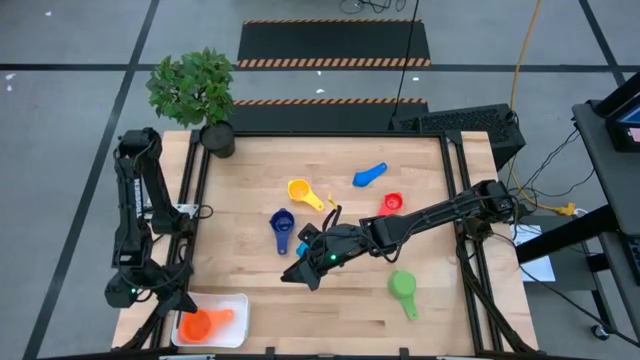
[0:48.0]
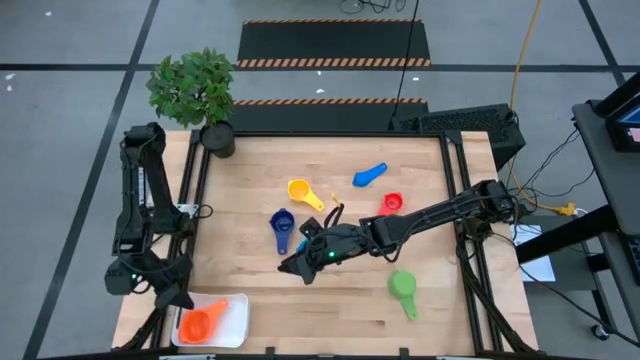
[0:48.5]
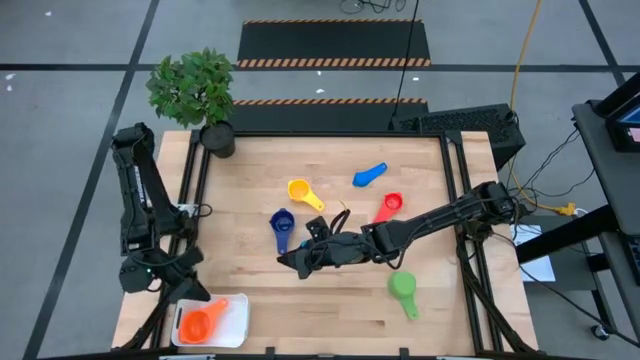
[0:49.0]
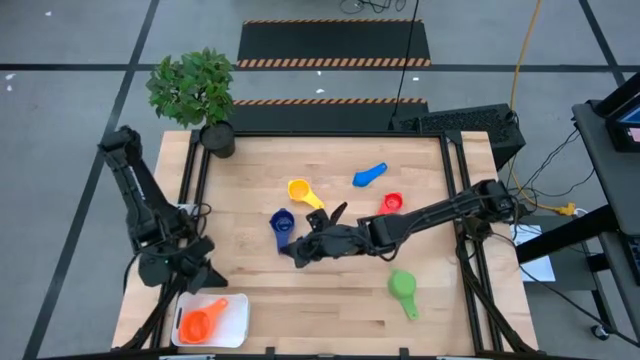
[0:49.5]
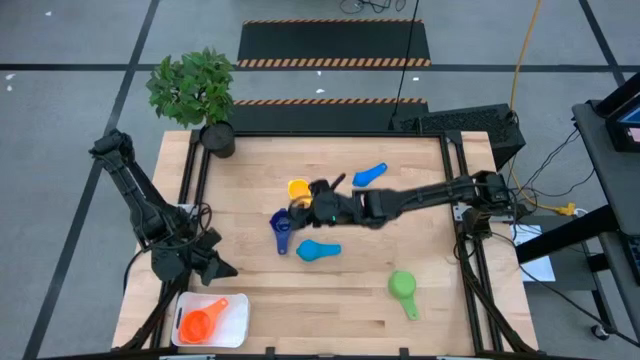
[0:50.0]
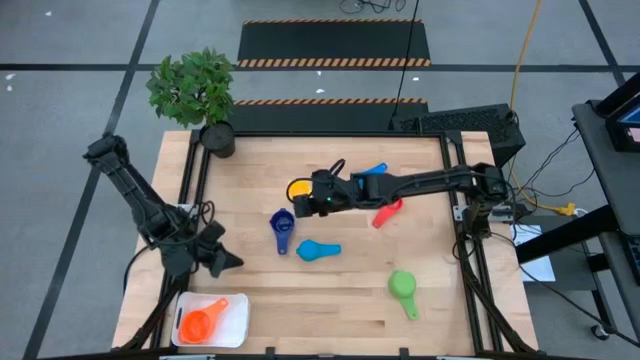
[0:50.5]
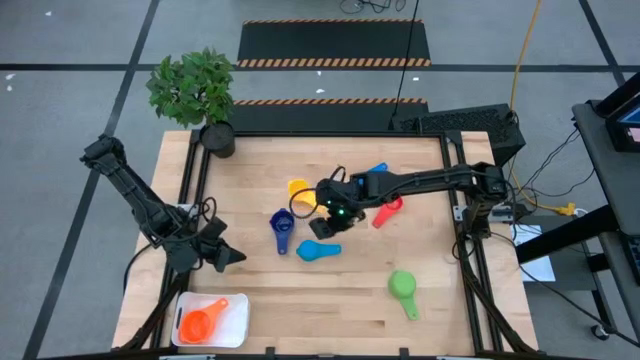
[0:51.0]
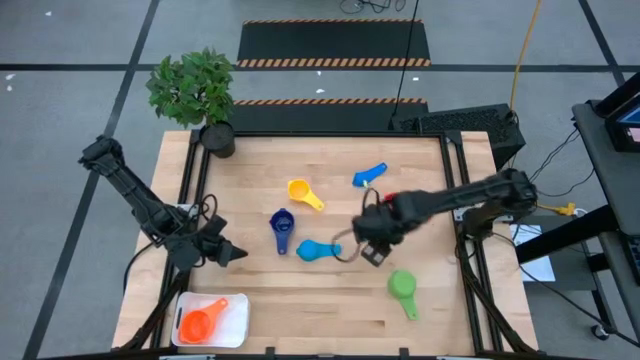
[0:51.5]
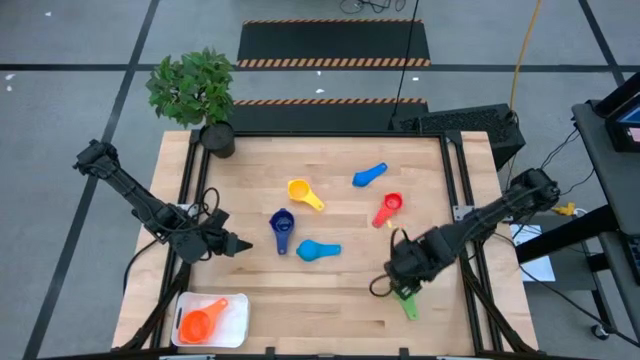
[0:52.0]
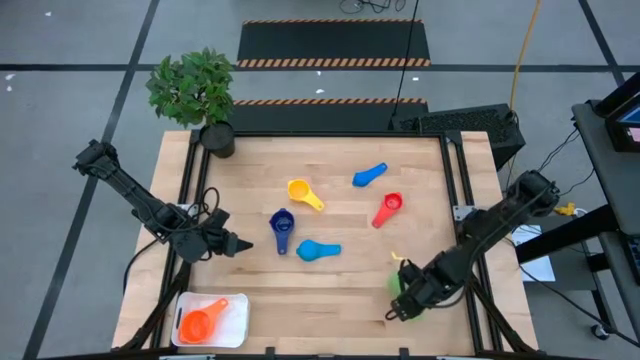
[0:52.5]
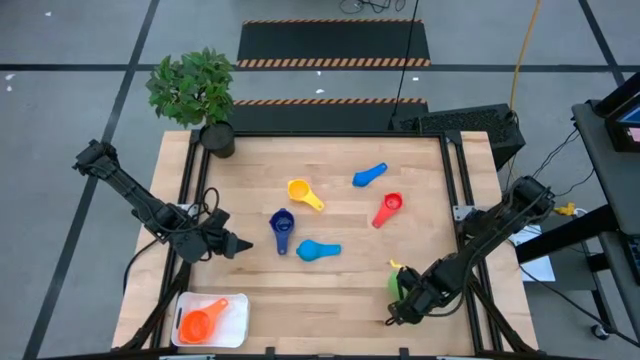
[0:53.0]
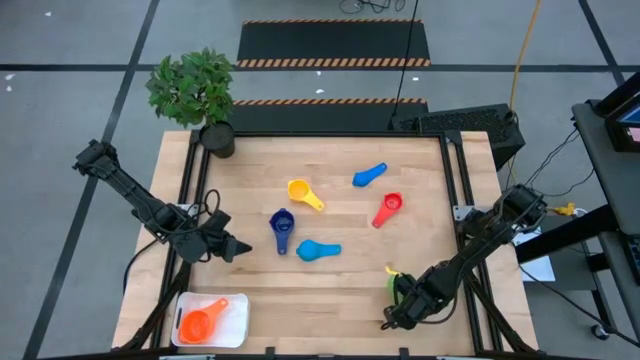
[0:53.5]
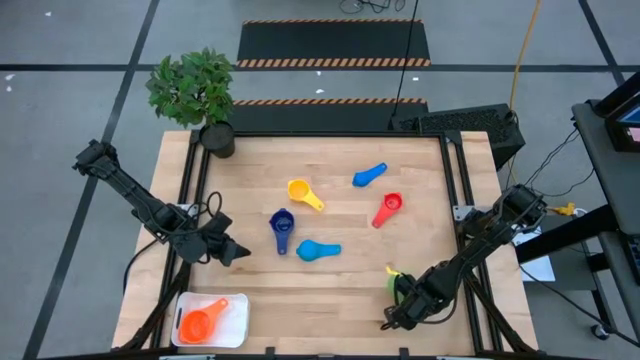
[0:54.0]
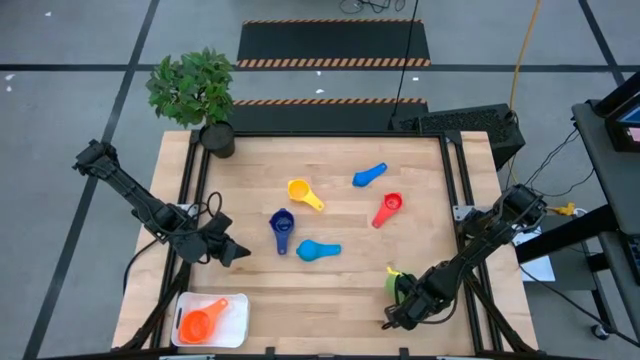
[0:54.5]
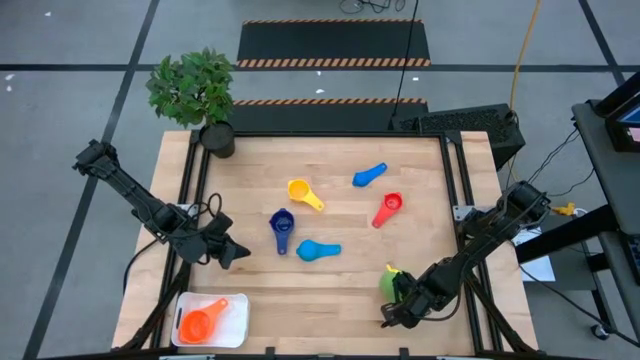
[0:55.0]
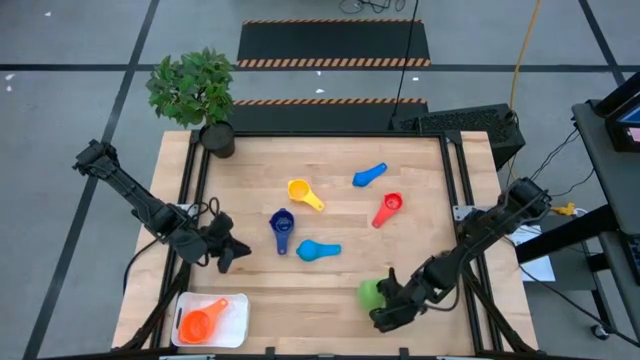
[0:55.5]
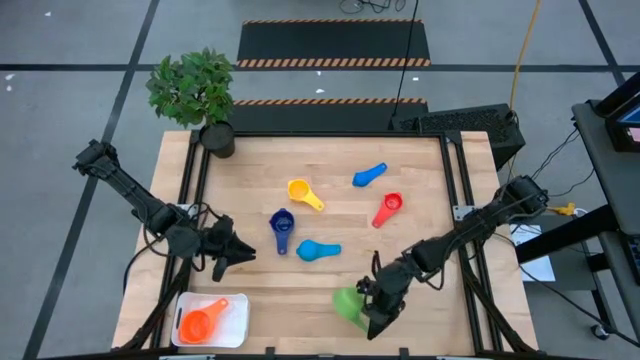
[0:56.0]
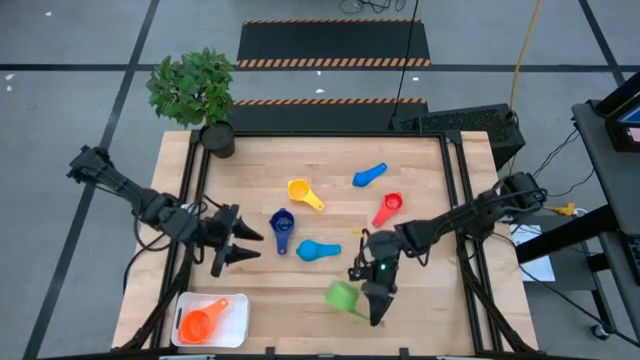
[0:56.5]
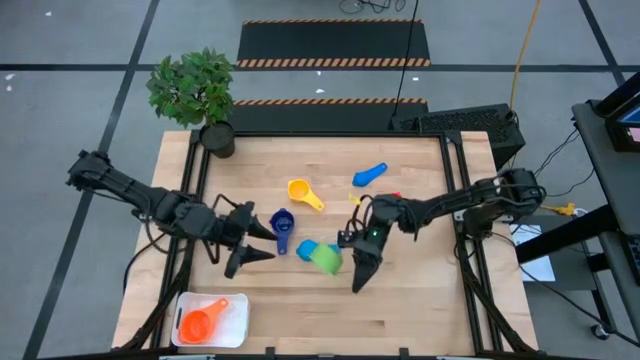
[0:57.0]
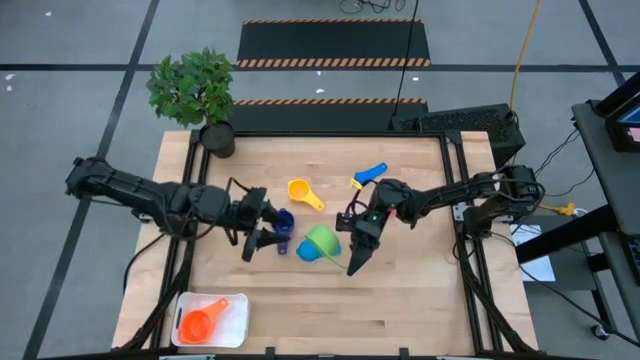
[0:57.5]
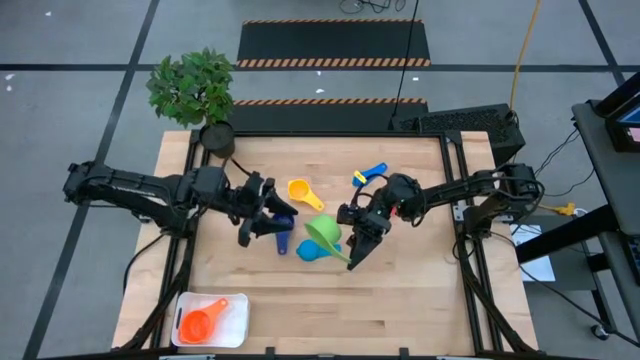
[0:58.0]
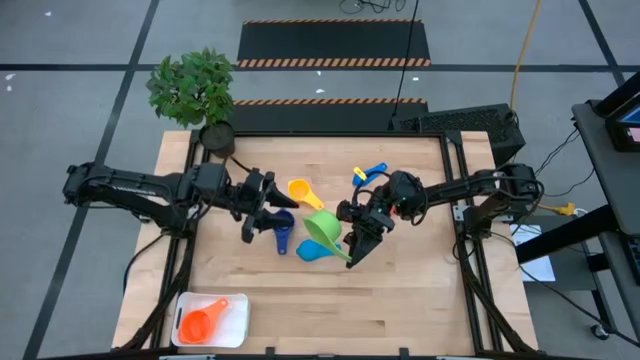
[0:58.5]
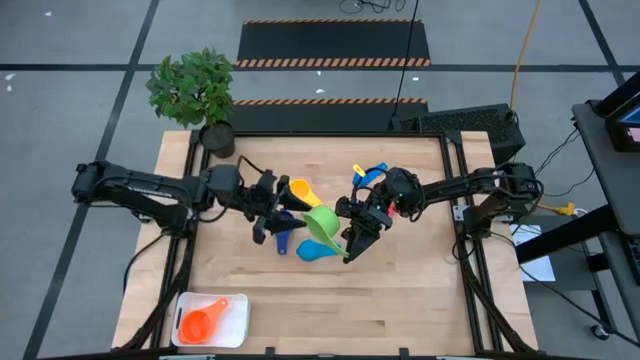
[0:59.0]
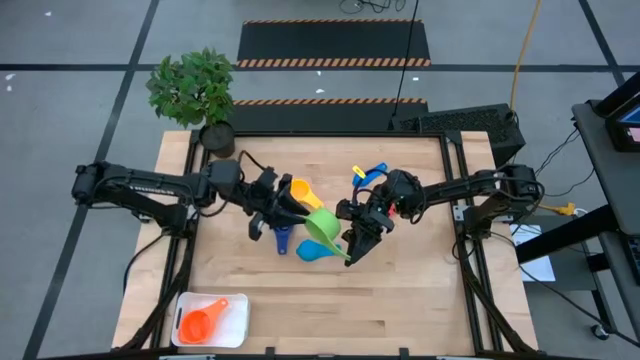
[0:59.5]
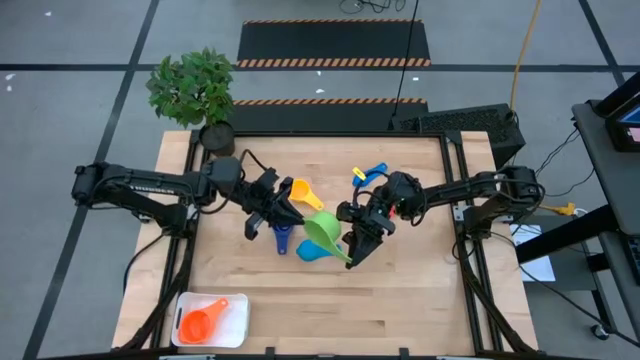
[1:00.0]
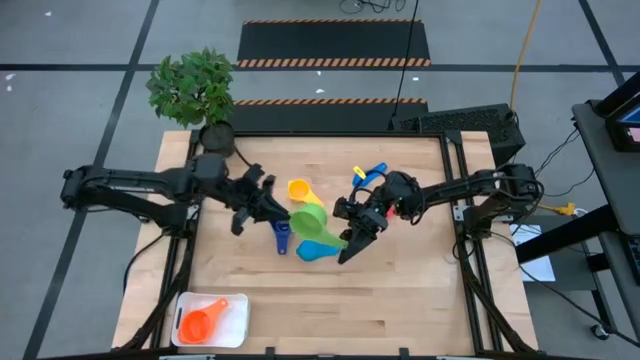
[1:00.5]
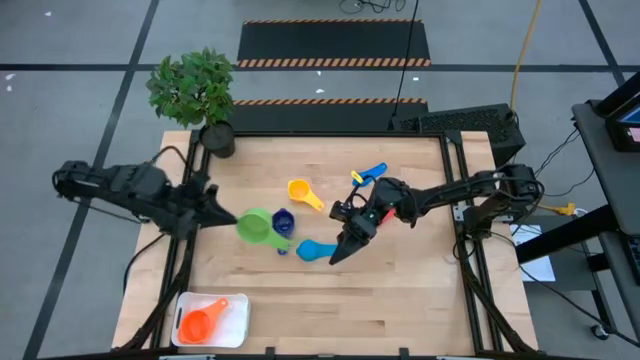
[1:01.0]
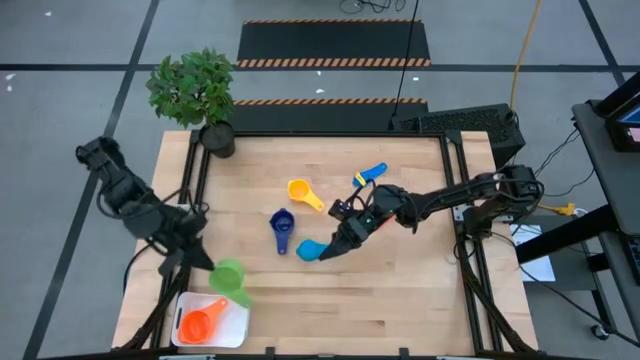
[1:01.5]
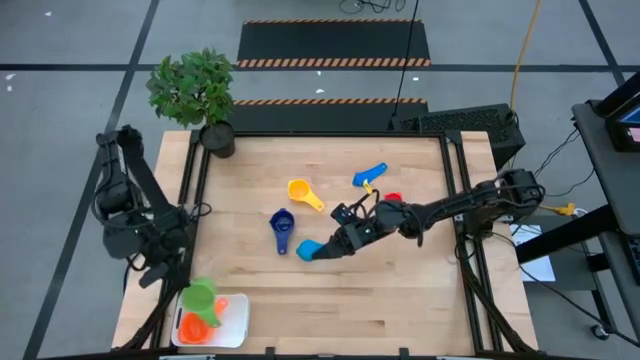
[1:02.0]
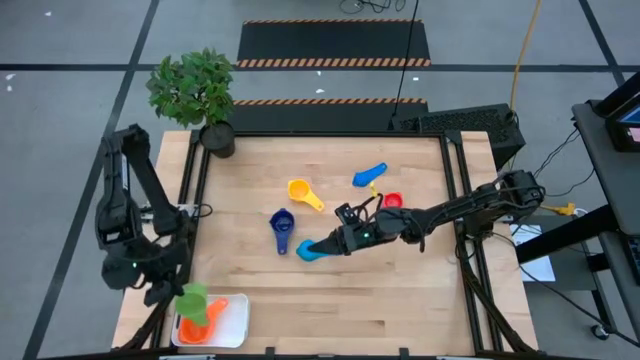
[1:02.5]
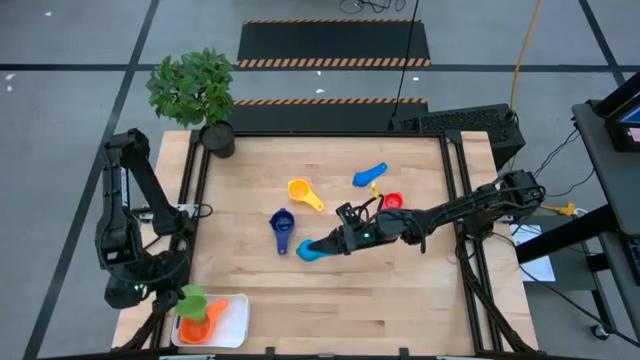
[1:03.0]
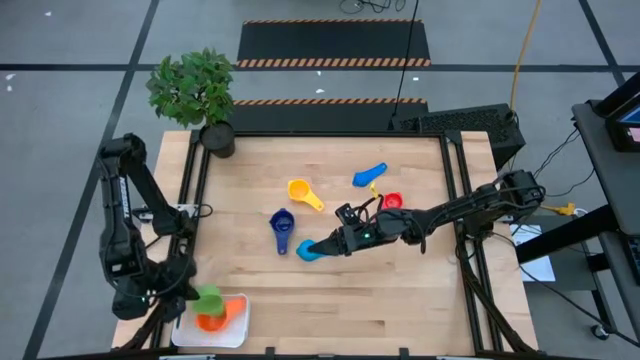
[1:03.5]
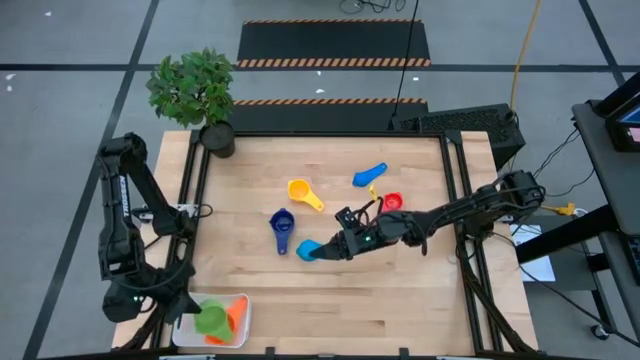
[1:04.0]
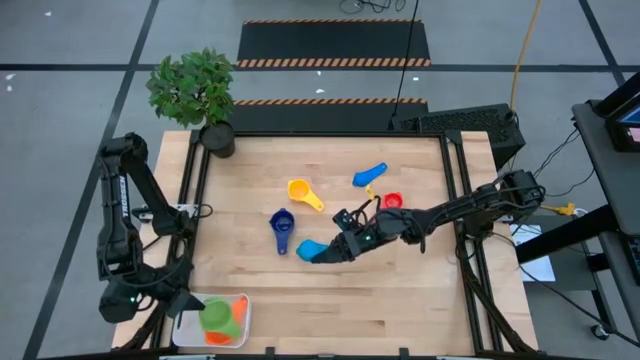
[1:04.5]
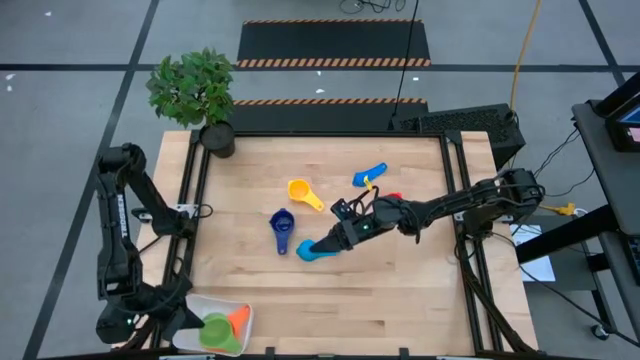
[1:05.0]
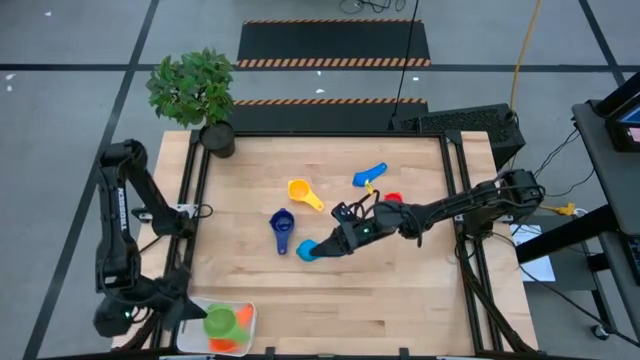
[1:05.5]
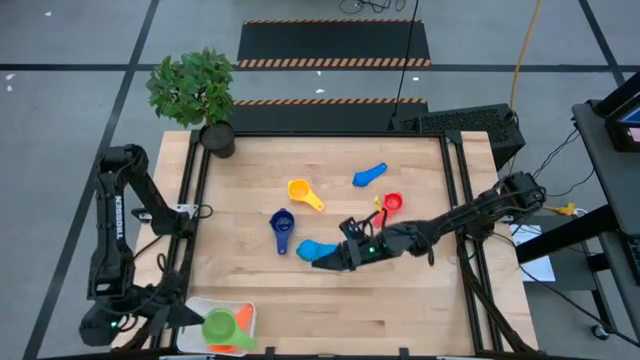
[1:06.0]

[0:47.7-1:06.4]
Task: Nest measuring cups in basket
Stack the green measuring cup on top of the orange measuring cup in the white bin
